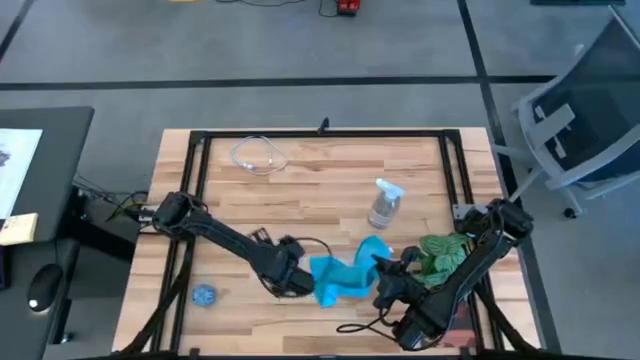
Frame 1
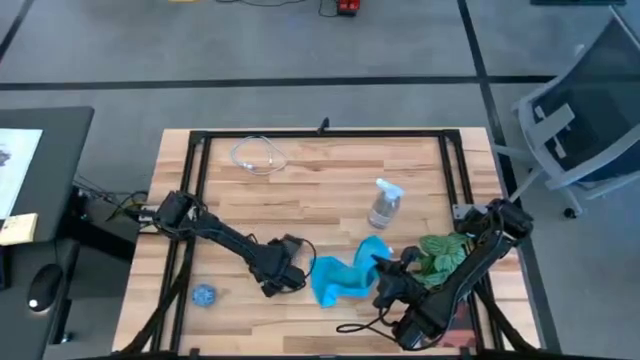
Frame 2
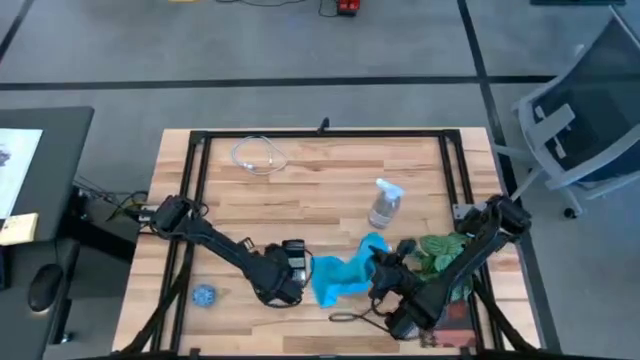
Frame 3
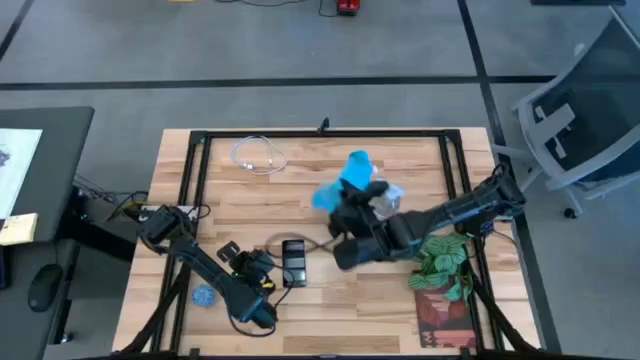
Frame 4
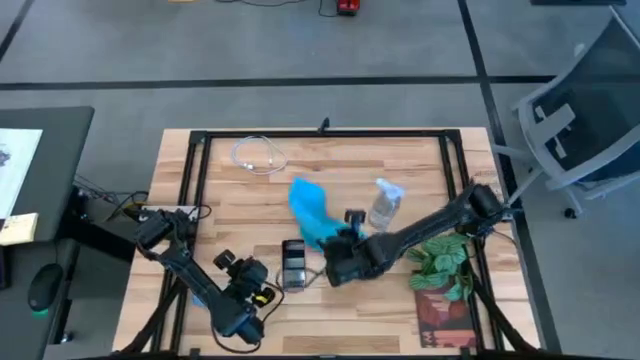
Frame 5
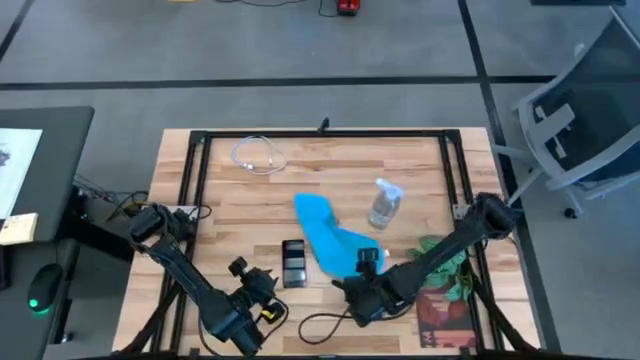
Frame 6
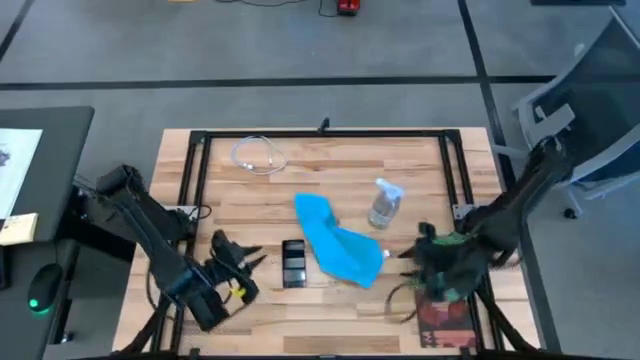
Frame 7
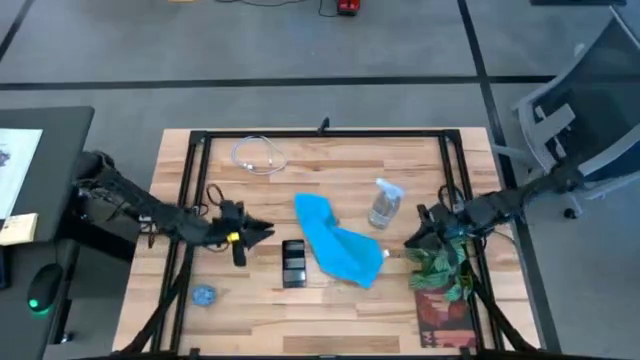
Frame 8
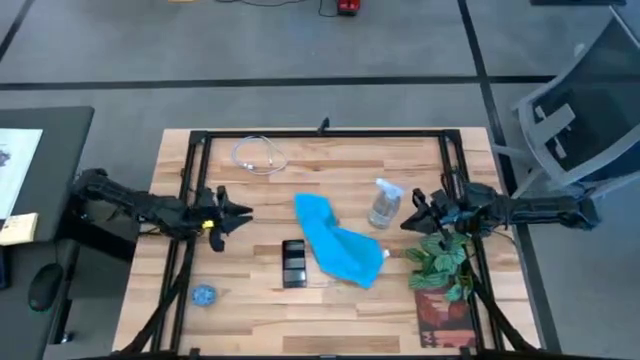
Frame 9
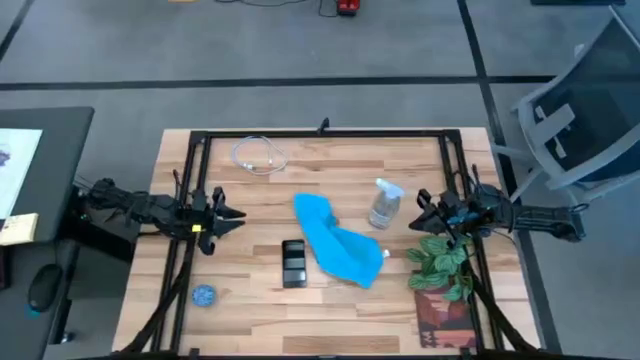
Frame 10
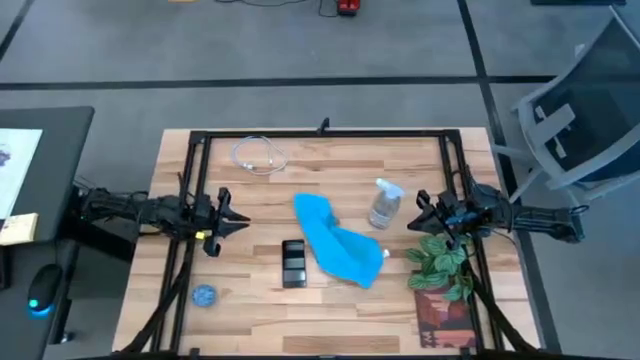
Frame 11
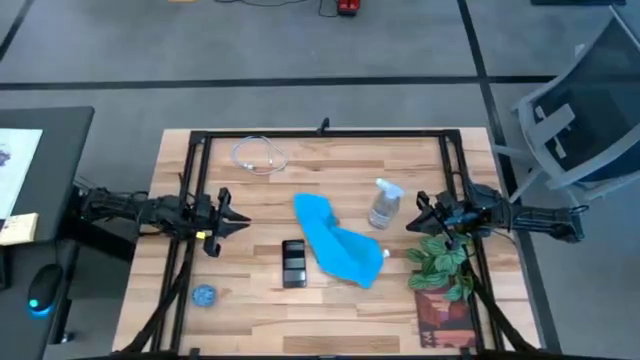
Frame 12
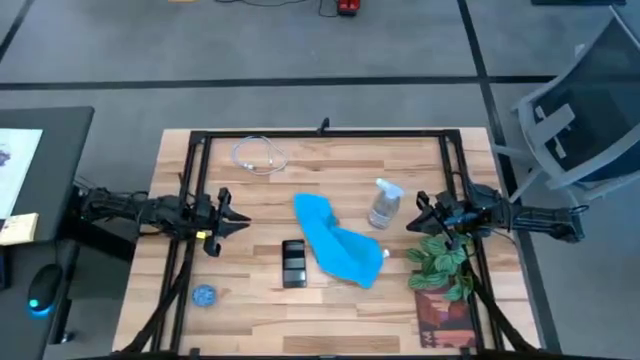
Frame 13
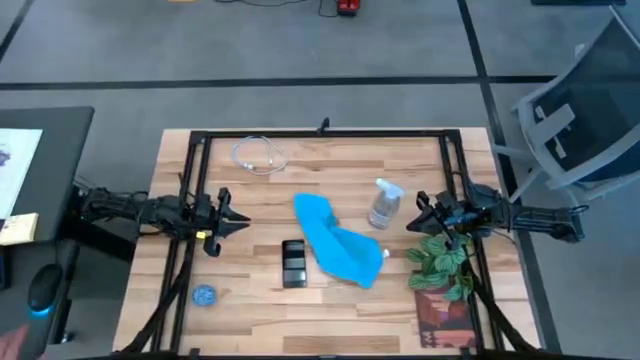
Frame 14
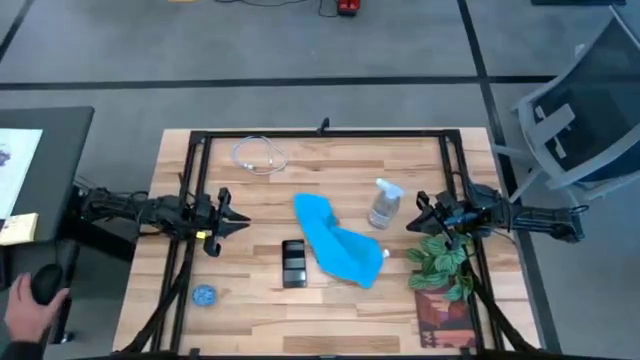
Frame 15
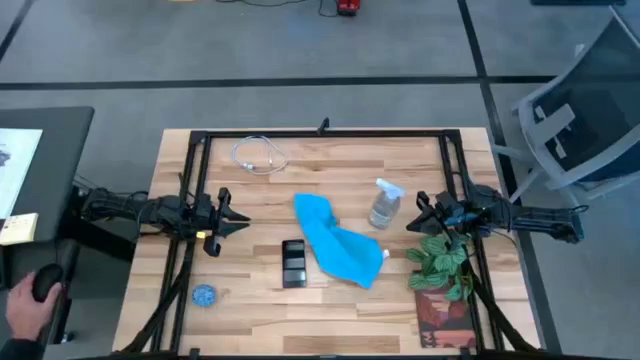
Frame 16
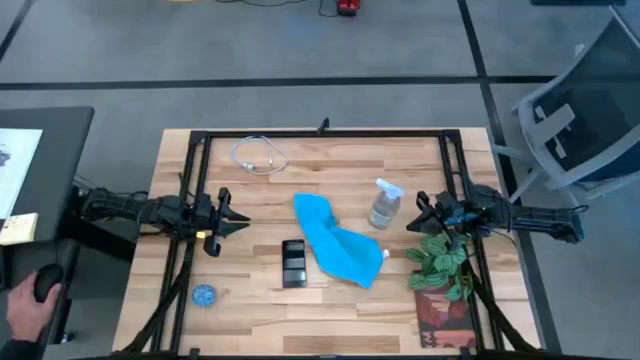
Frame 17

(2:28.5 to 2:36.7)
Task: Apply microfiber cloth
Return to Home Position

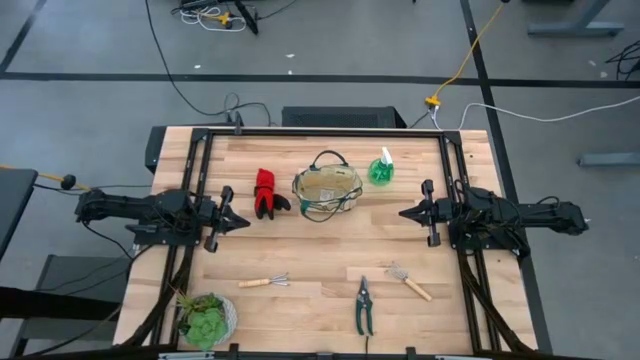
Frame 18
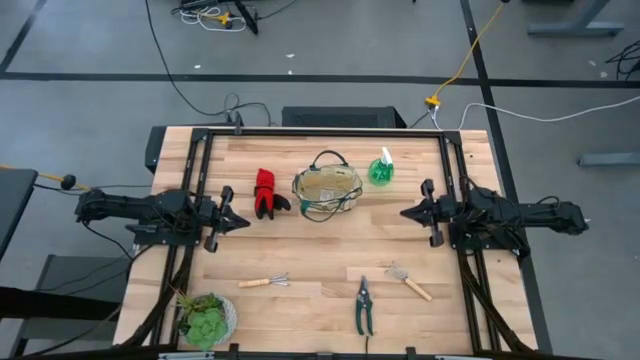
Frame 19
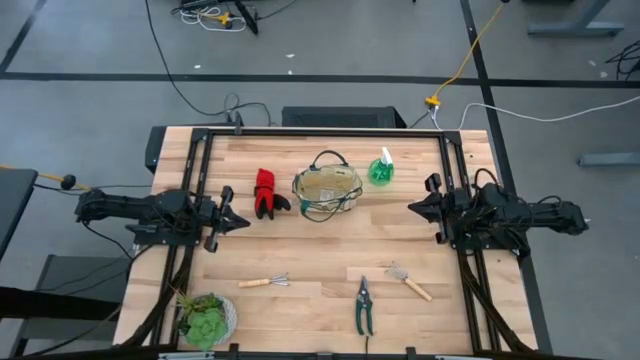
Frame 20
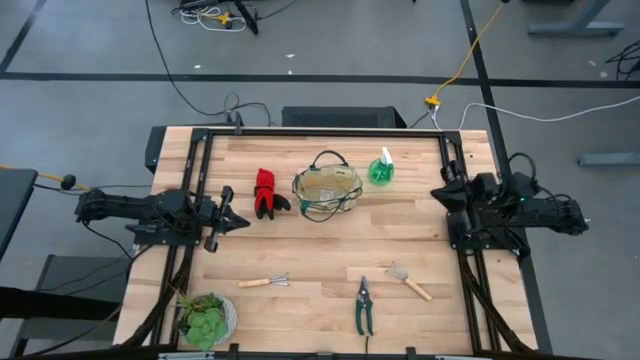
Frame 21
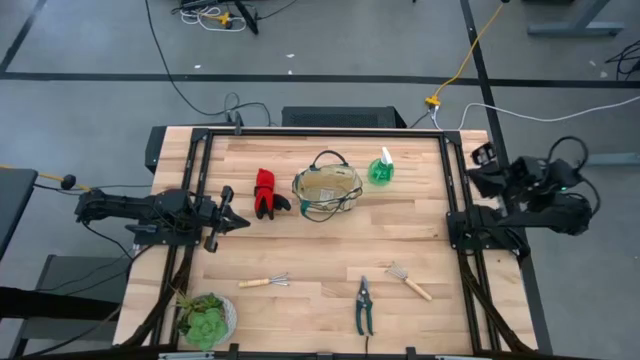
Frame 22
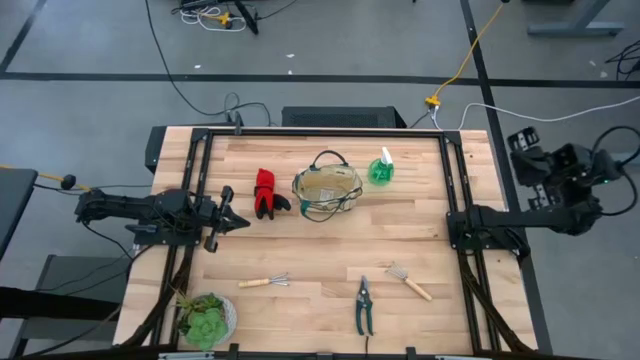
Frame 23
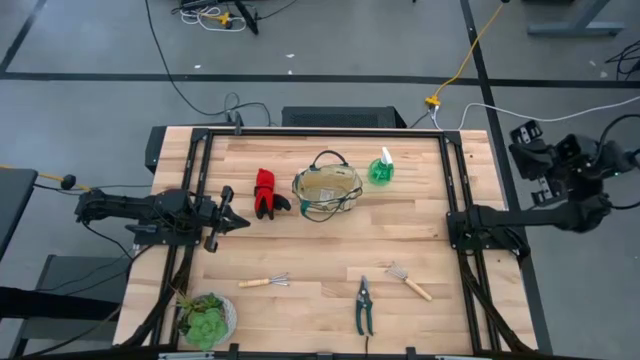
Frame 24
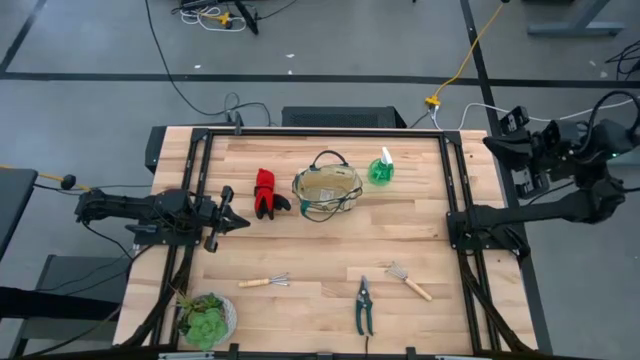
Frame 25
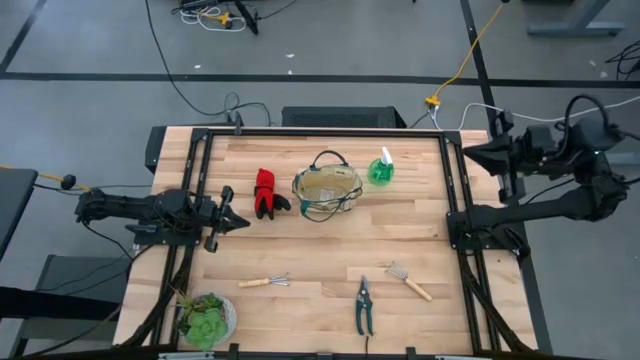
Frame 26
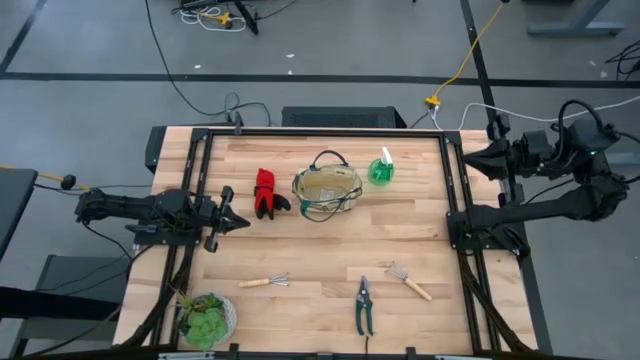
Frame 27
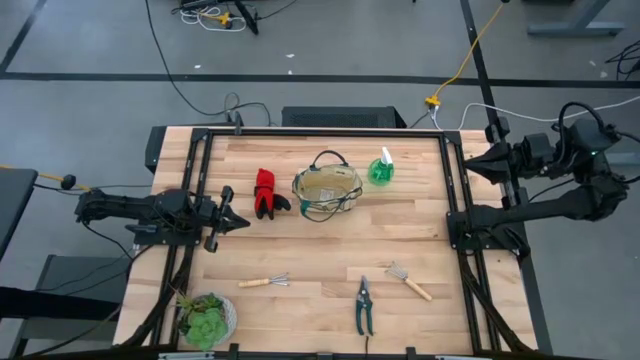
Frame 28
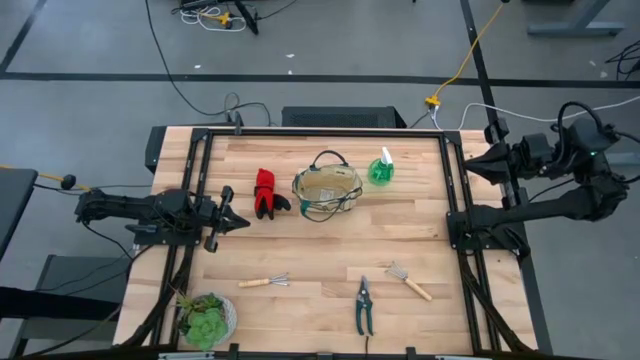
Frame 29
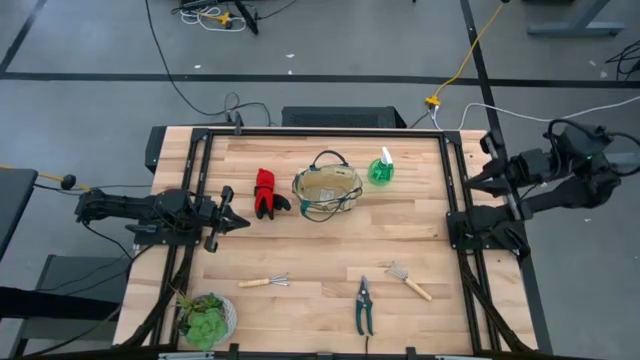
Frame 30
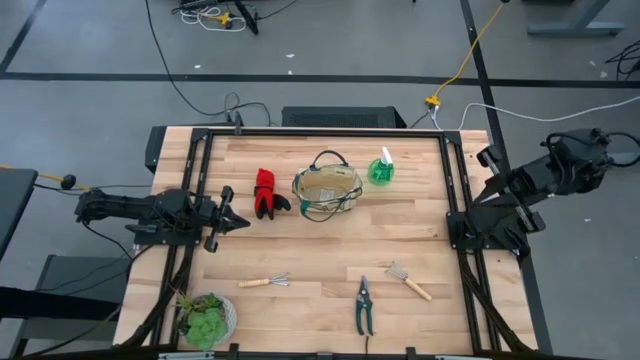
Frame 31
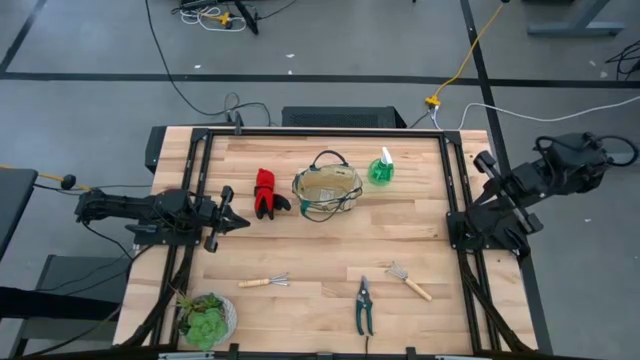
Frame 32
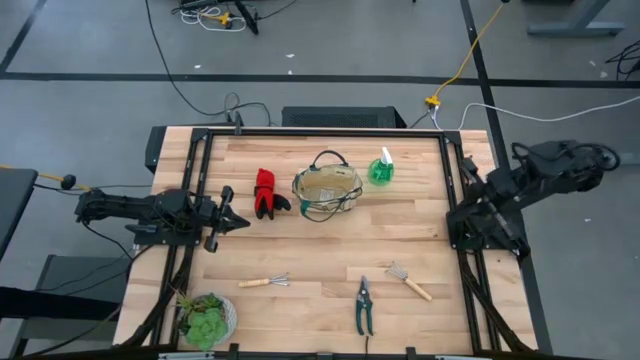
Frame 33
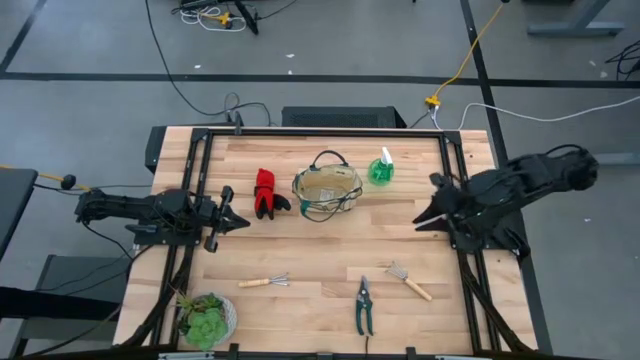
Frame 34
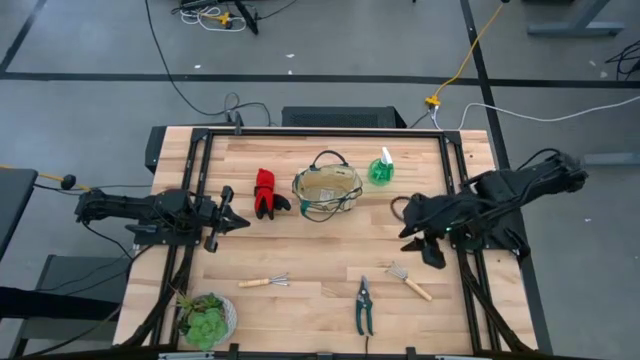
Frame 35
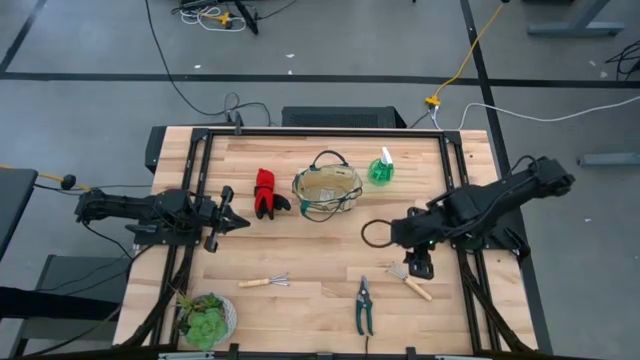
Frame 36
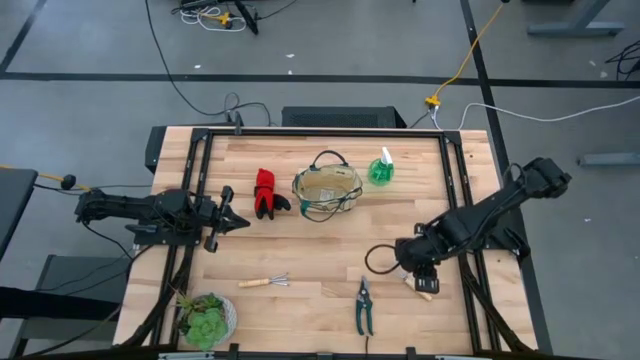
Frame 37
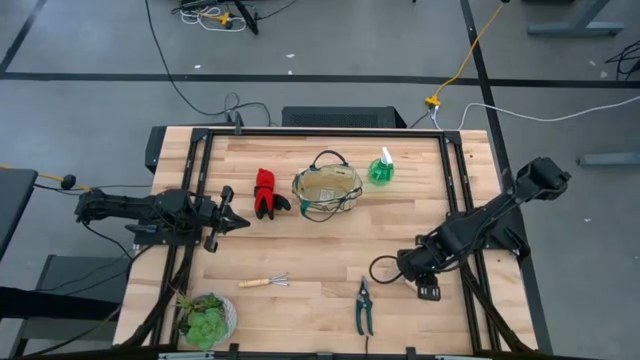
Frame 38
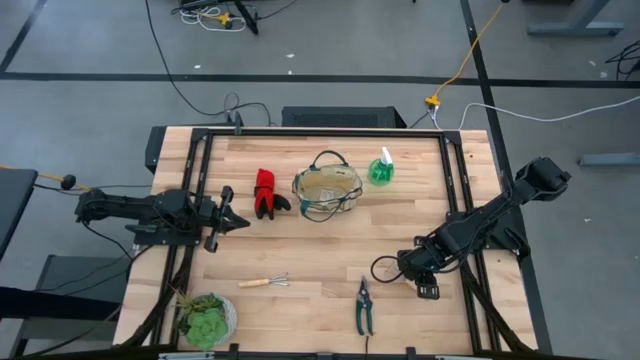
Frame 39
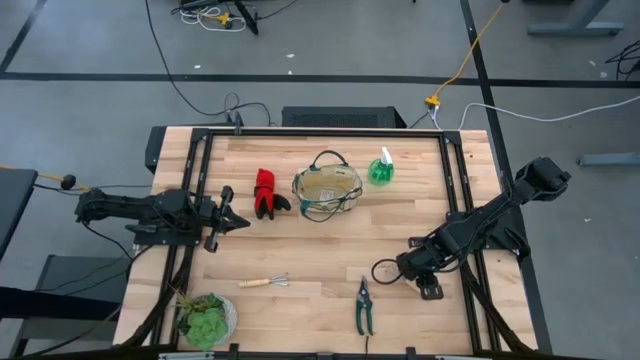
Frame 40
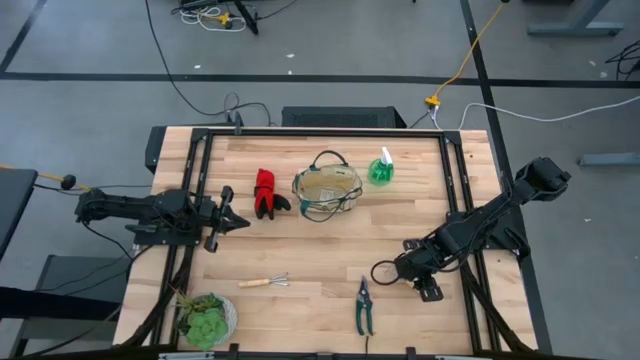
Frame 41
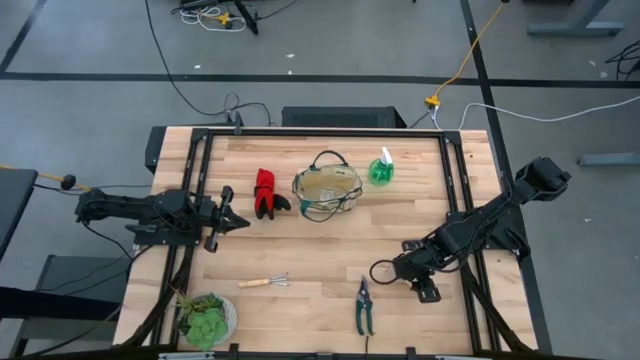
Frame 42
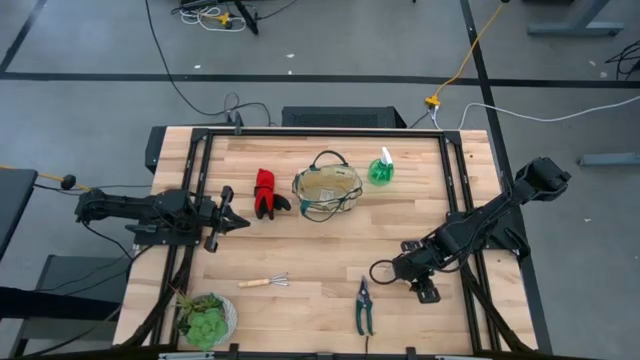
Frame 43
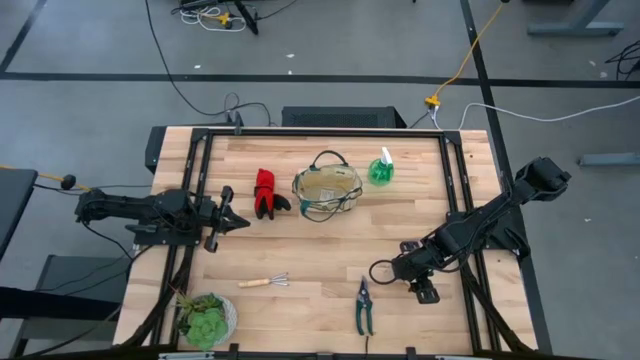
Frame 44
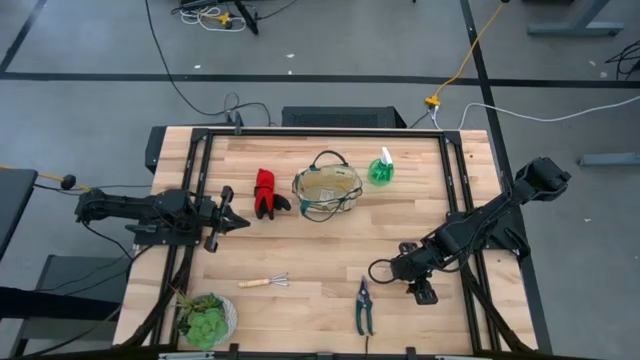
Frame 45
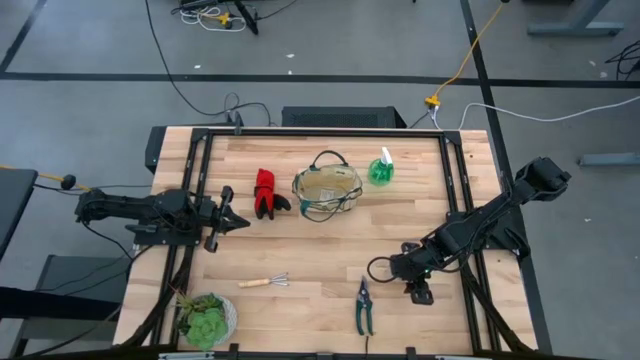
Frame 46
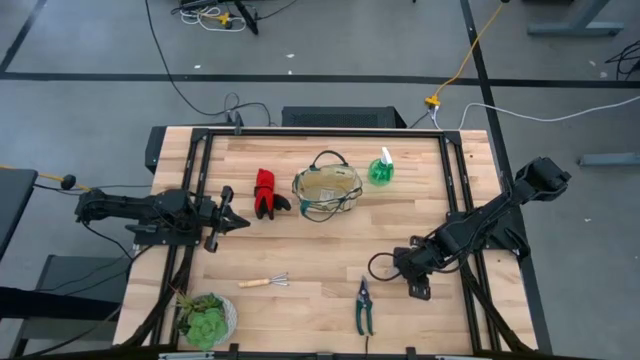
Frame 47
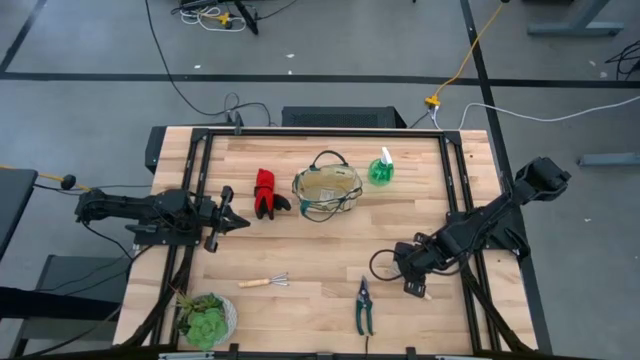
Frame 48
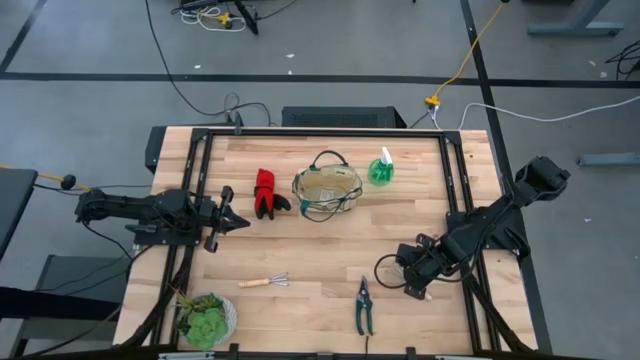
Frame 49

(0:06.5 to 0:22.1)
Task: Pick & Place Garden tools in Gardening bag
Put the right brown hand rake into the gardening bag
